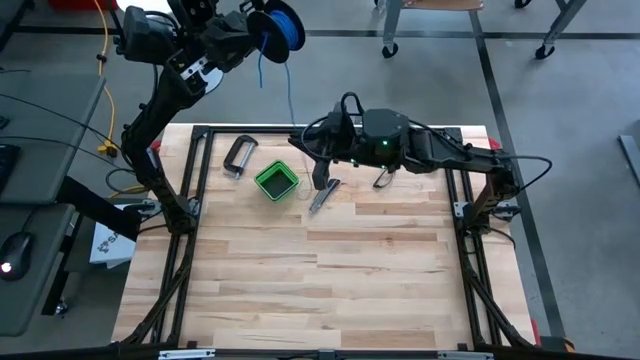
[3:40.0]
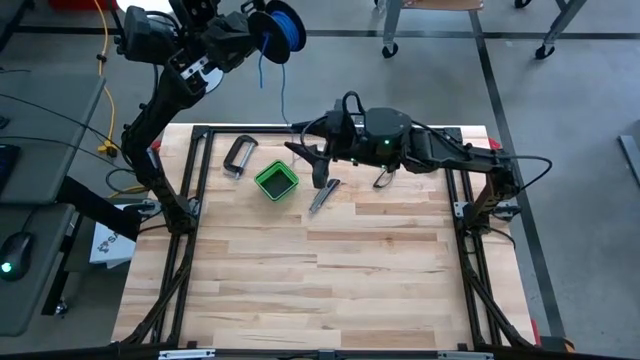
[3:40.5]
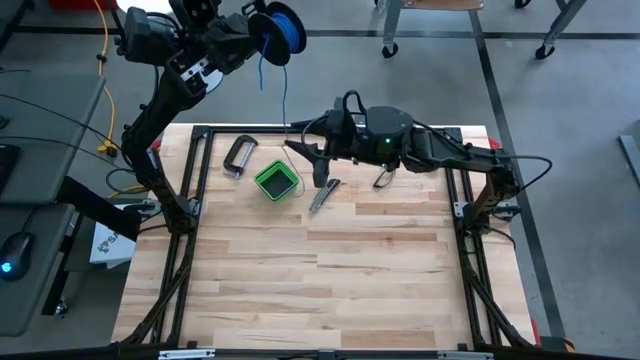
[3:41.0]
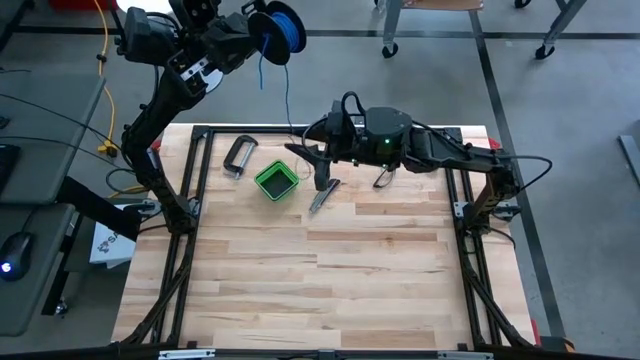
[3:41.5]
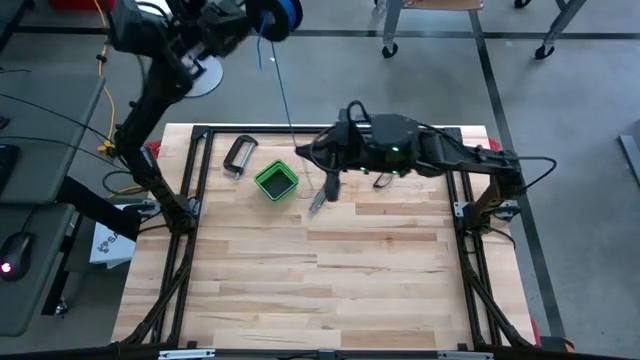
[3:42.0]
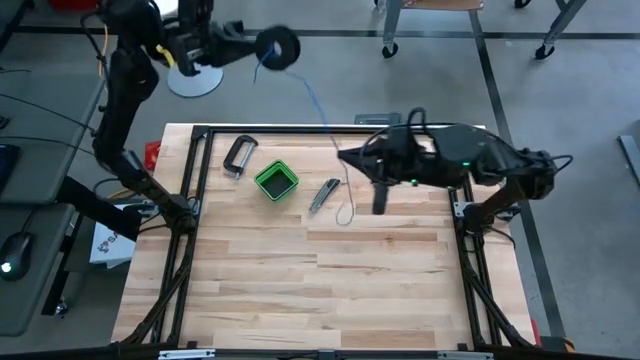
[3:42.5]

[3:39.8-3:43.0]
Task: Coil cords
Coil the blue wire onto the spool

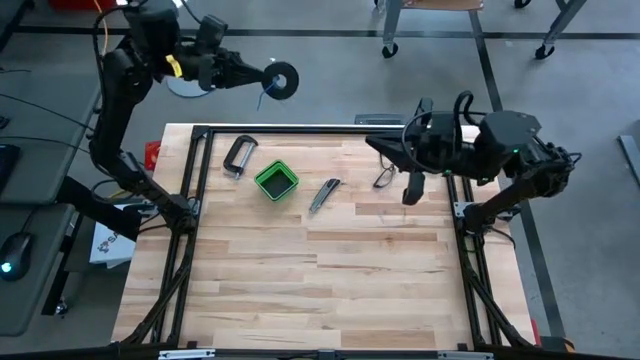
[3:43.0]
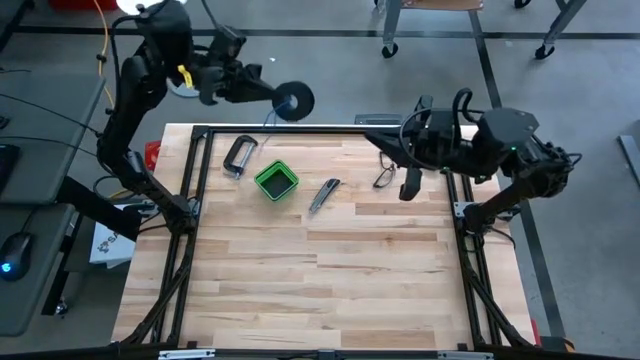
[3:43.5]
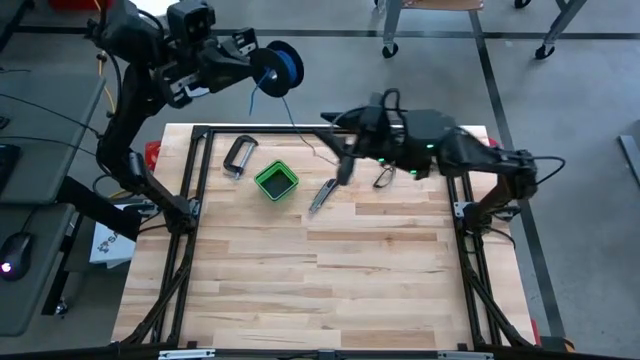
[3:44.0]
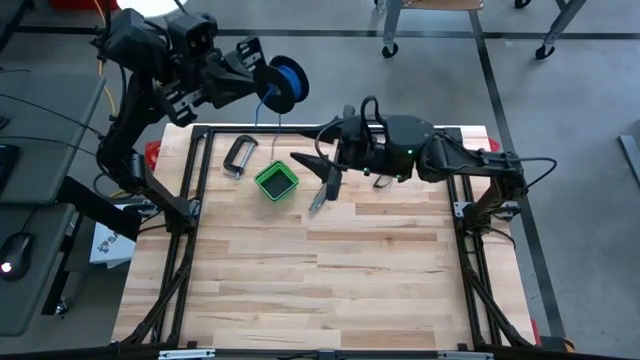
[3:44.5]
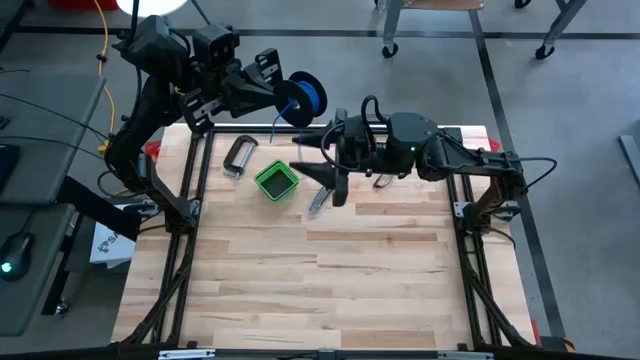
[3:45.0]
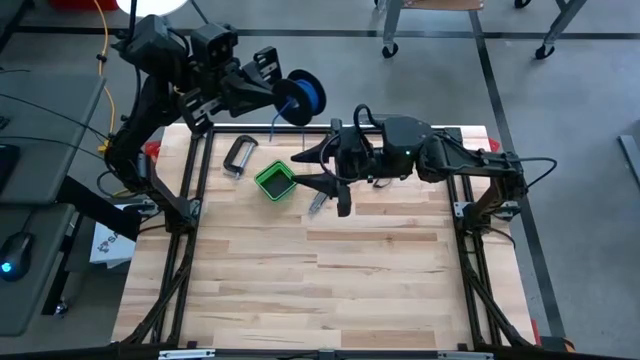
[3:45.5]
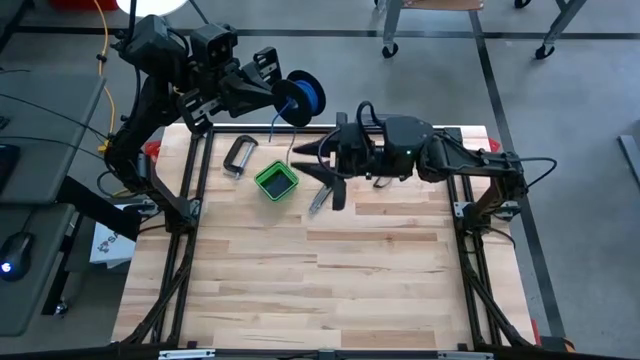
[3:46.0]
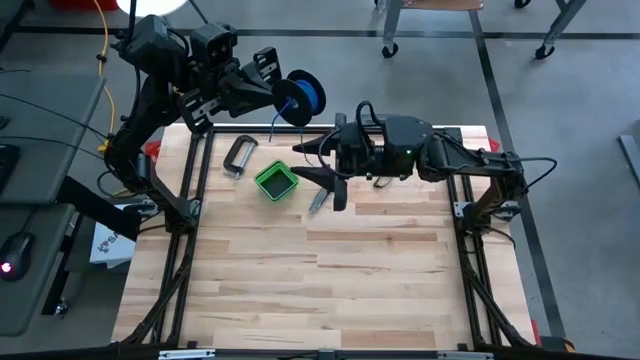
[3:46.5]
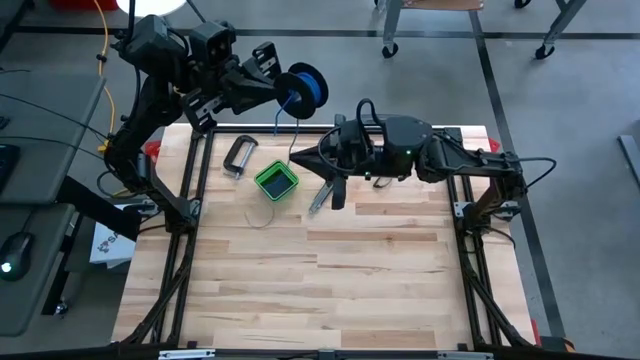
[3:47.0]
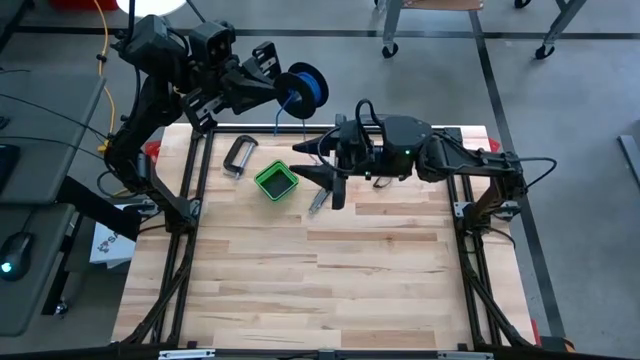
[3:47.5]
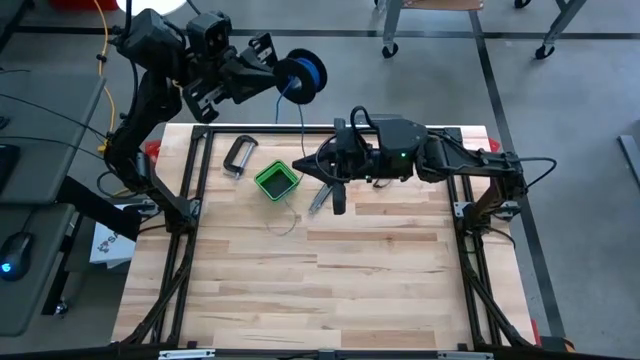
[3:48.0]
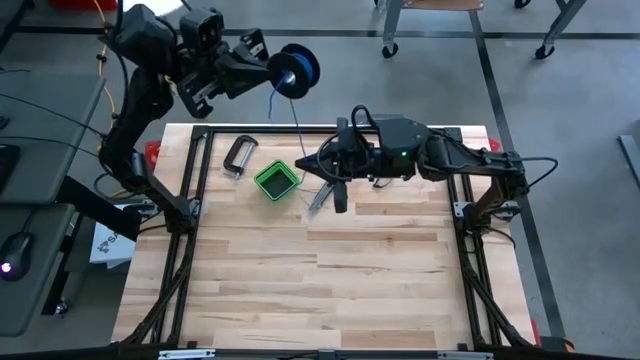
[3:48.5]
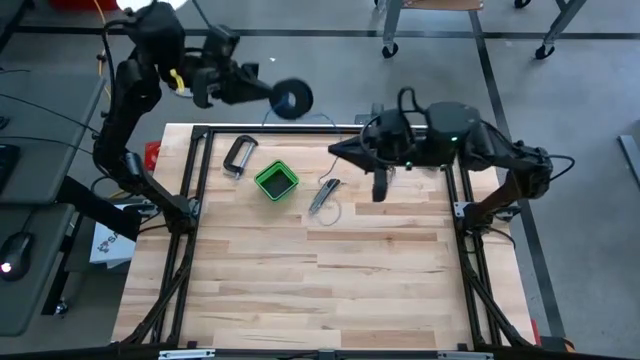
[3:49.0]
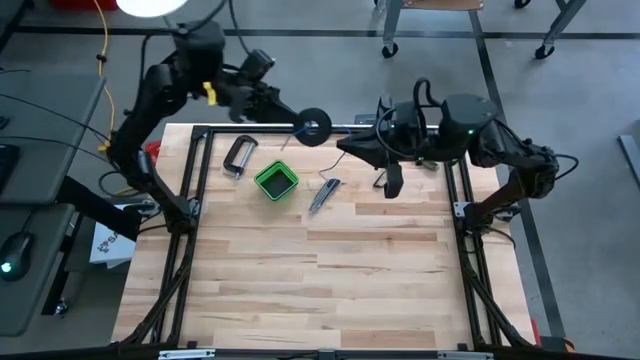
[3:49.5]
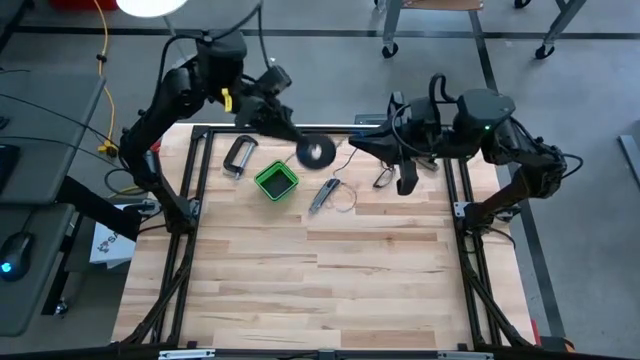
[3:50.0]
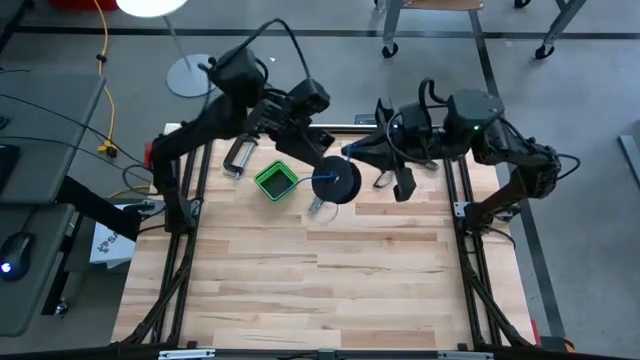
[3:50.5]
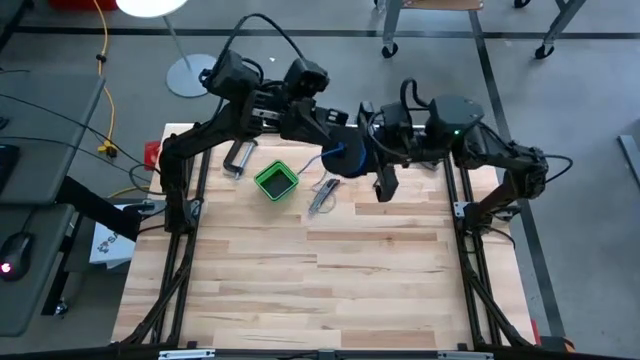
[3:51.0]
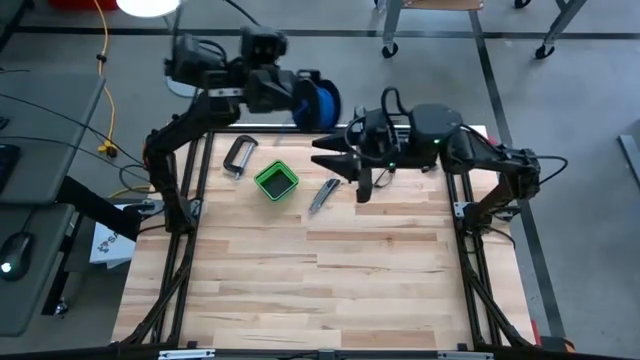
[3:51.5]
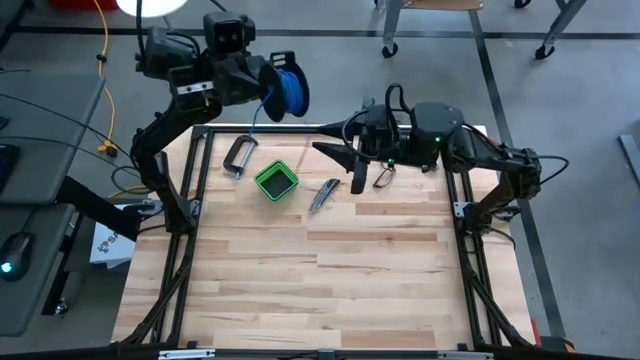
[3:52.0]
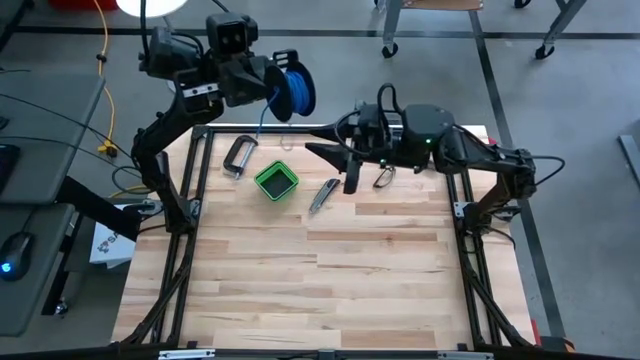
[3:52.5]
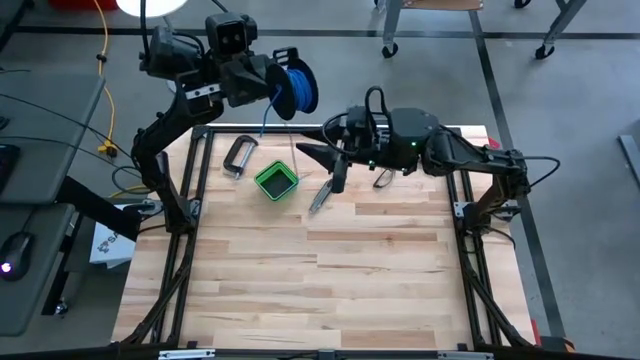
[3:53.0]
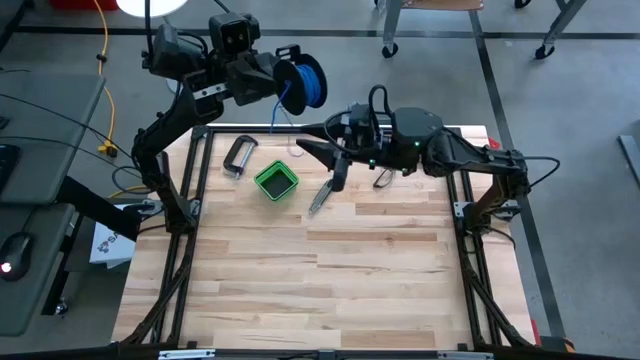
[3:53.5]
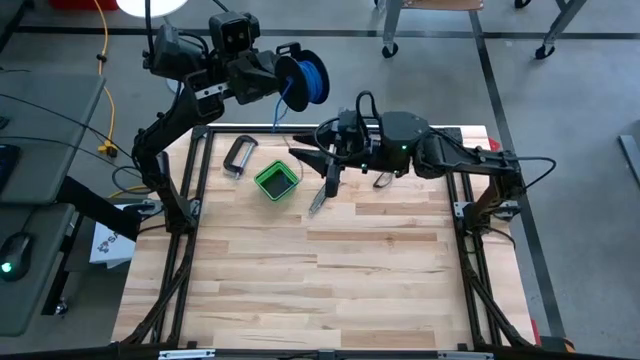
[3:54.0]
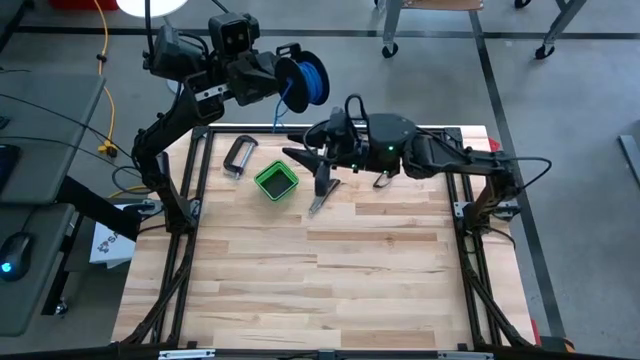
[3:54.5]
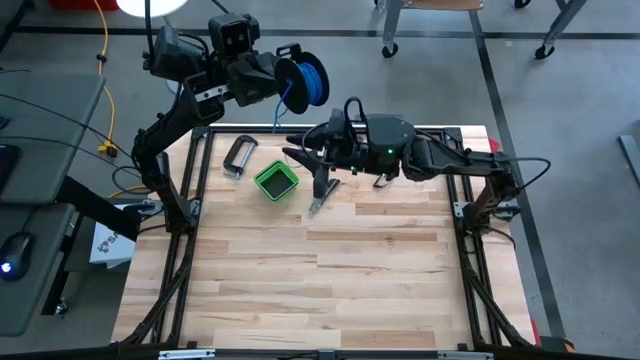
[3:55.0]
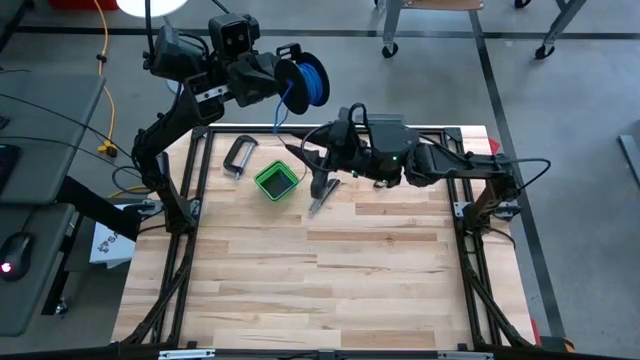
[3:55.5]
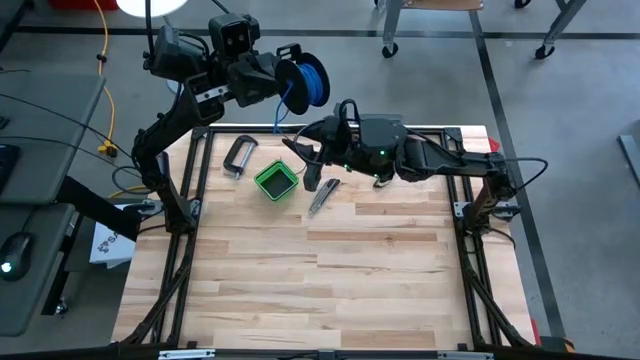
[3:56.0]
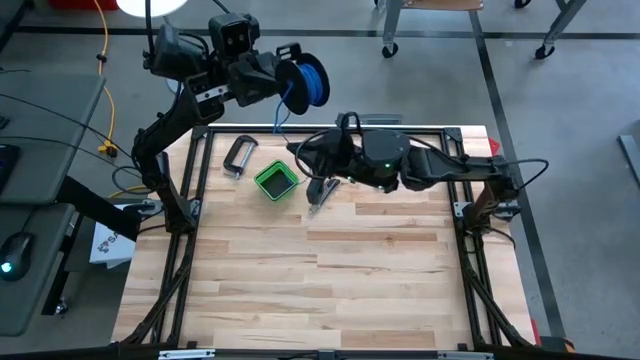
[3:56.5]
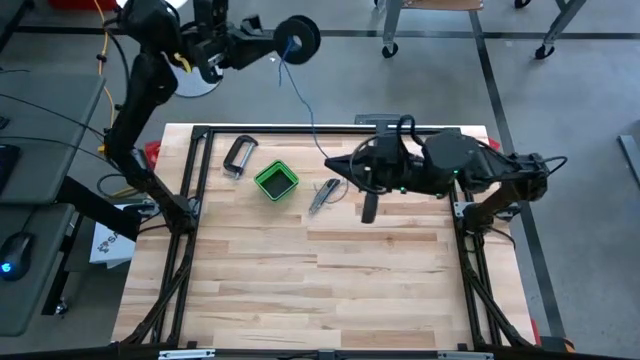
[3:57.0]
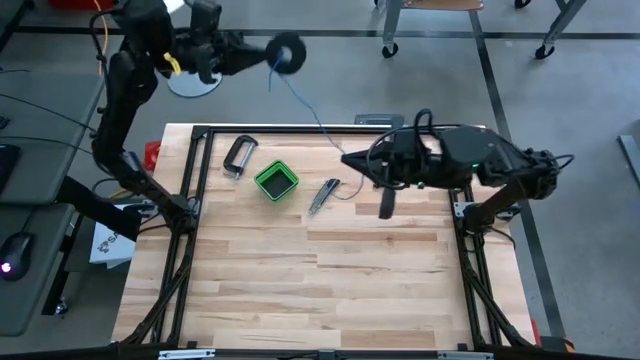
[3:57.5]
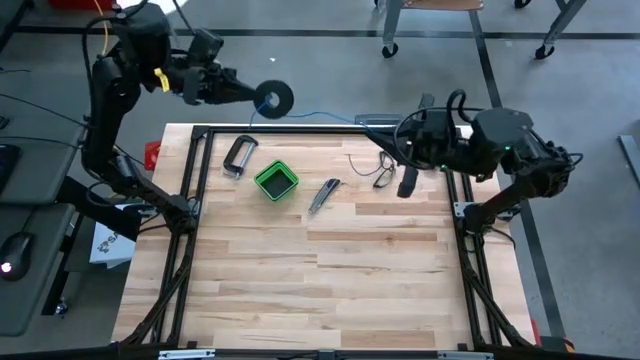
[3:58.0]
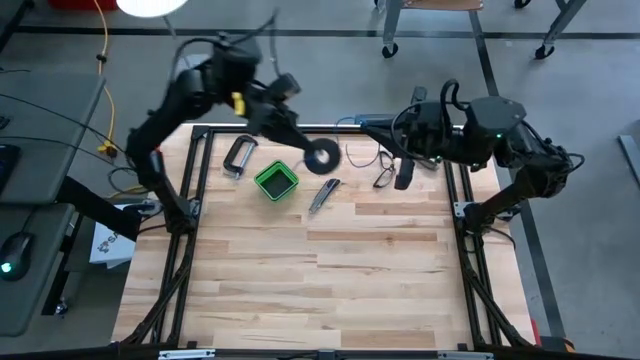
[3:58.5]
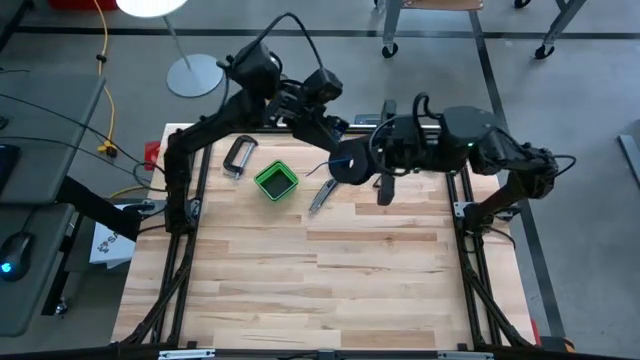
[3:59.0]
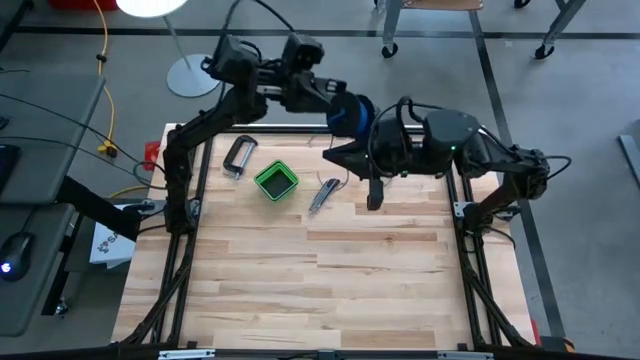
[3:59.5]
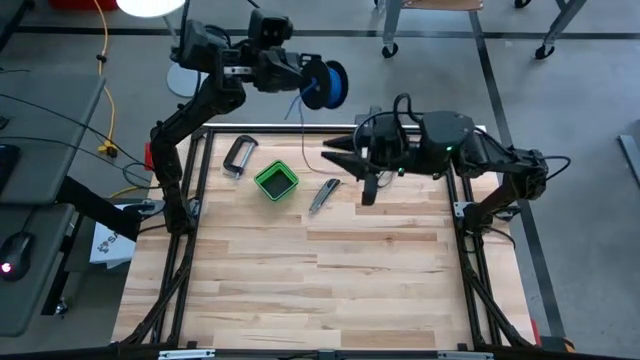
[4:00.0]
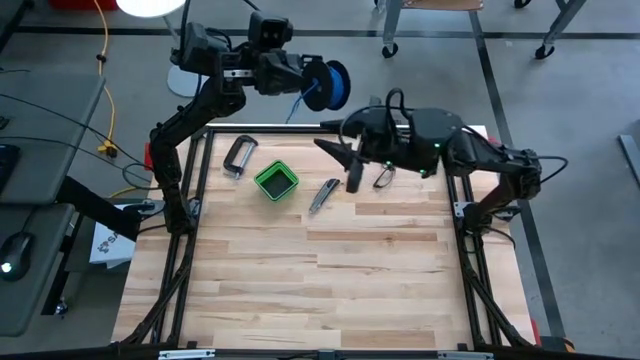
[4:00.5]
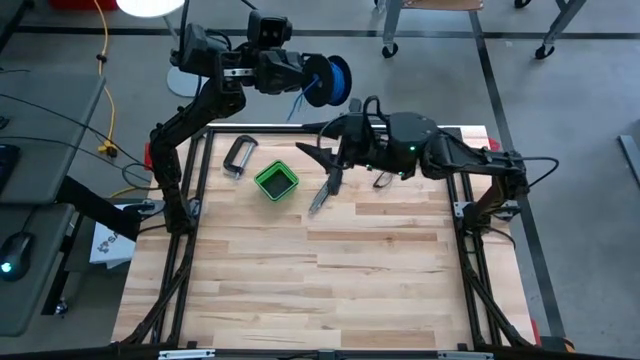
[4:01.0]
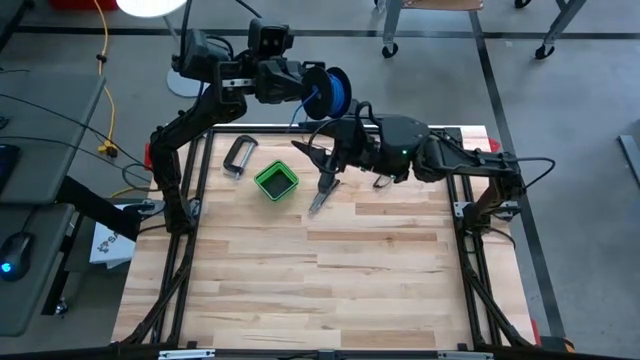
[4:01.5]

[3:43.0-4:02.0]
Coil the blue wire onto the spool
